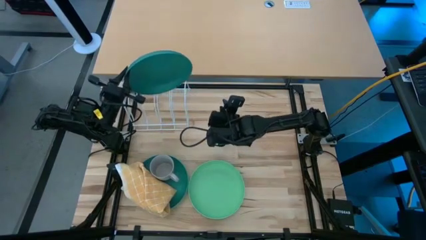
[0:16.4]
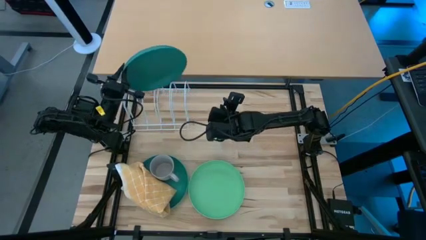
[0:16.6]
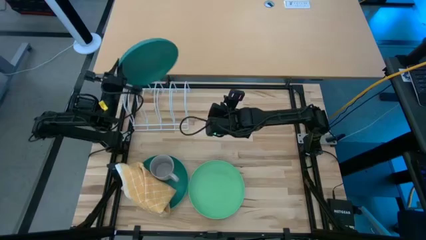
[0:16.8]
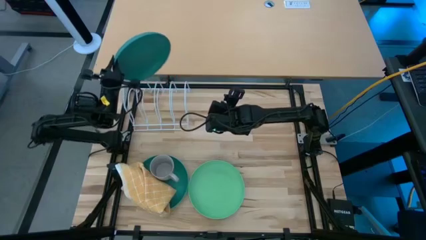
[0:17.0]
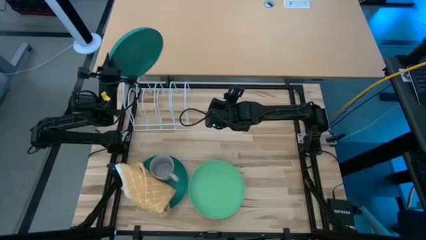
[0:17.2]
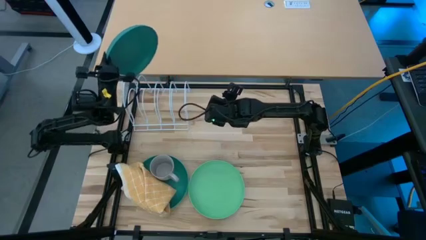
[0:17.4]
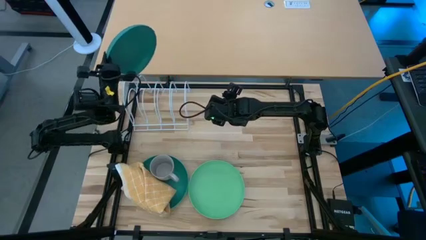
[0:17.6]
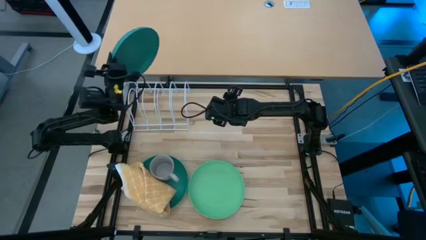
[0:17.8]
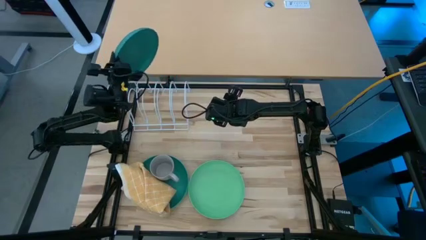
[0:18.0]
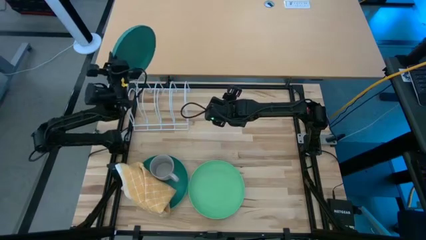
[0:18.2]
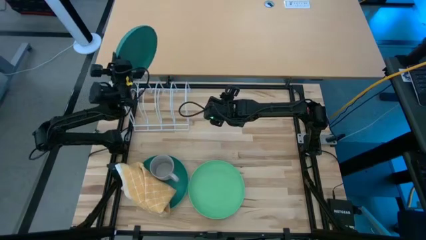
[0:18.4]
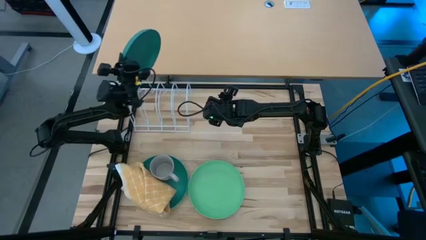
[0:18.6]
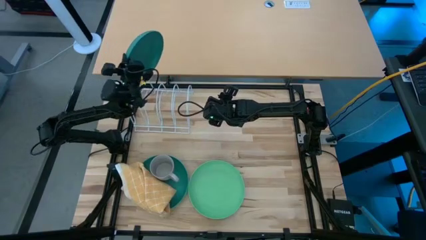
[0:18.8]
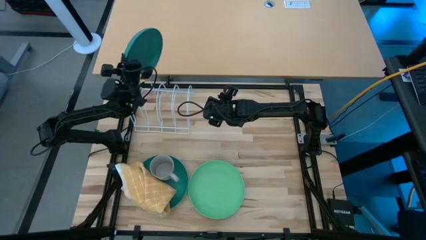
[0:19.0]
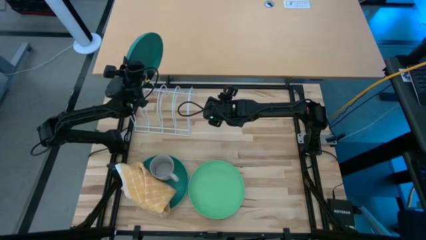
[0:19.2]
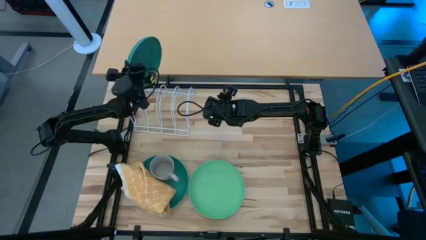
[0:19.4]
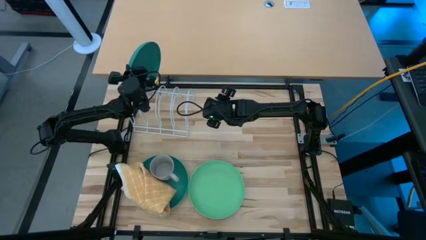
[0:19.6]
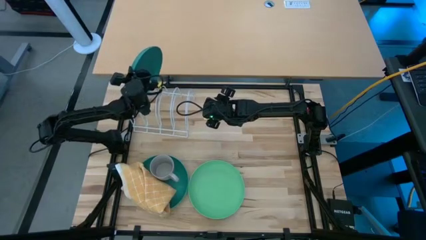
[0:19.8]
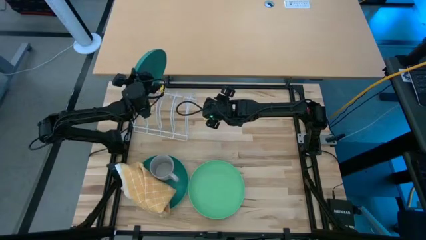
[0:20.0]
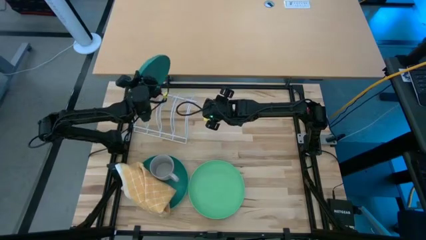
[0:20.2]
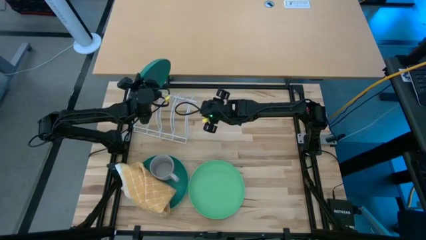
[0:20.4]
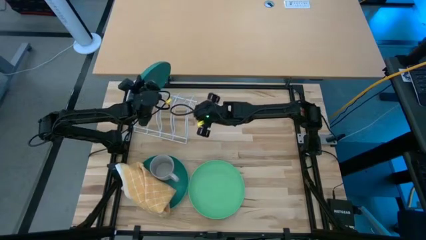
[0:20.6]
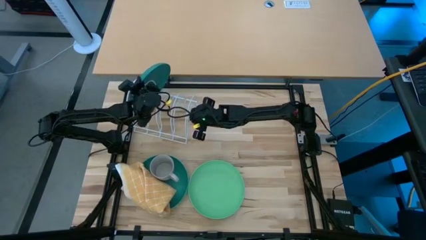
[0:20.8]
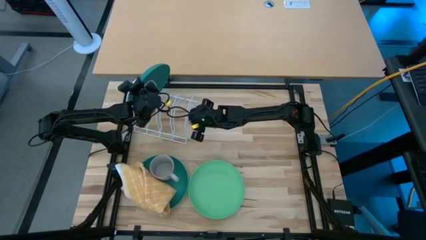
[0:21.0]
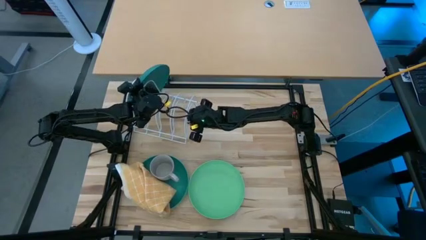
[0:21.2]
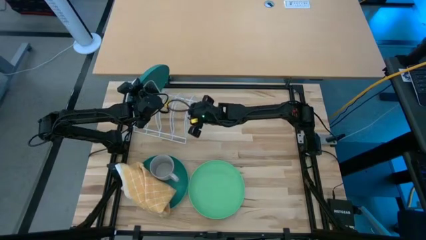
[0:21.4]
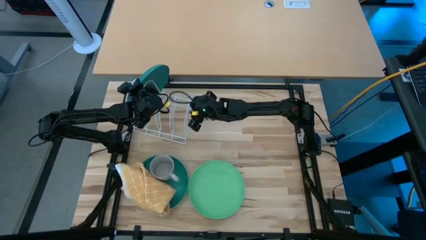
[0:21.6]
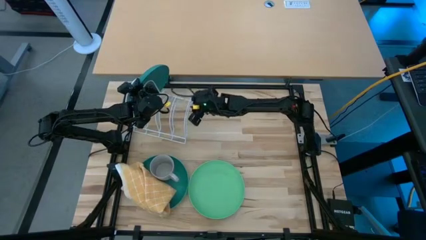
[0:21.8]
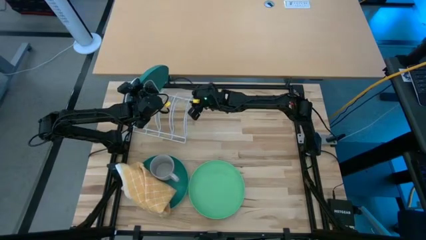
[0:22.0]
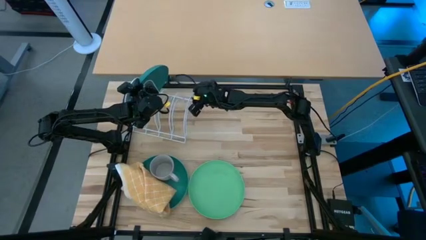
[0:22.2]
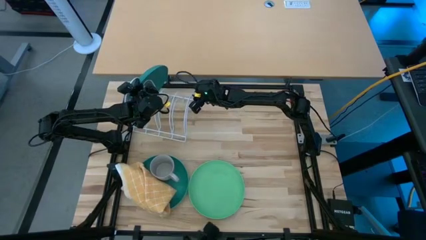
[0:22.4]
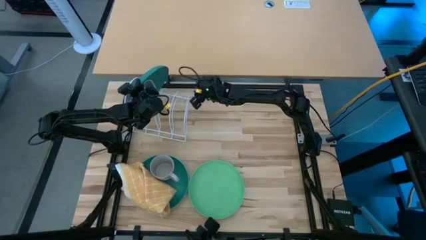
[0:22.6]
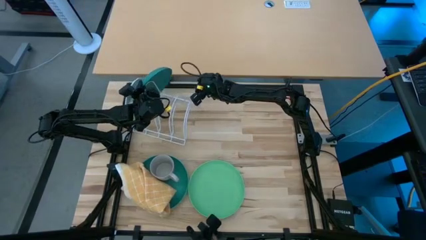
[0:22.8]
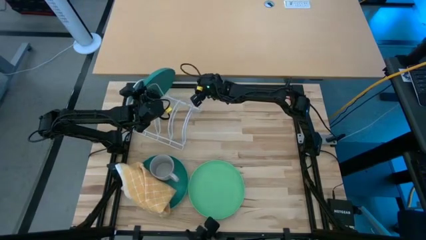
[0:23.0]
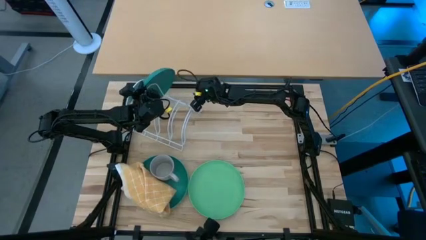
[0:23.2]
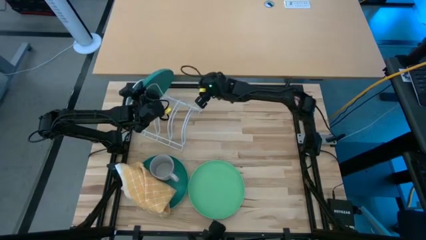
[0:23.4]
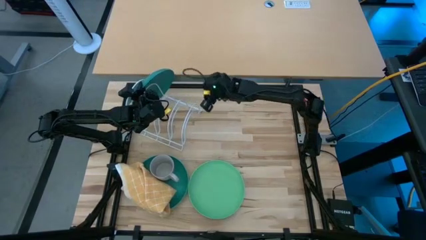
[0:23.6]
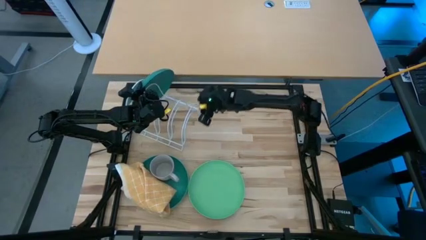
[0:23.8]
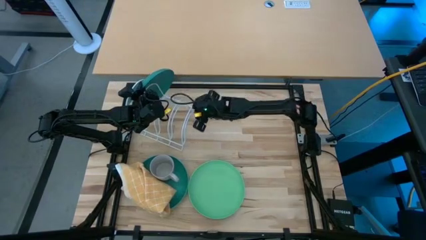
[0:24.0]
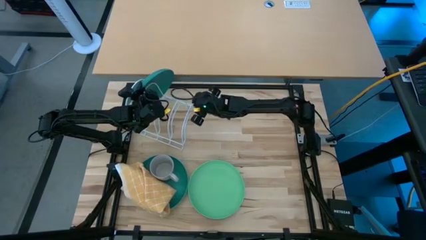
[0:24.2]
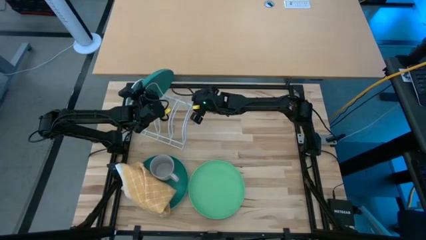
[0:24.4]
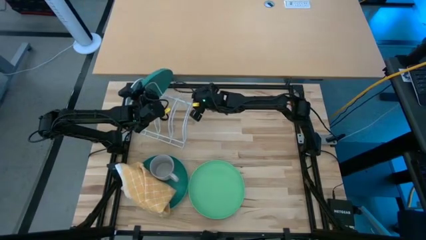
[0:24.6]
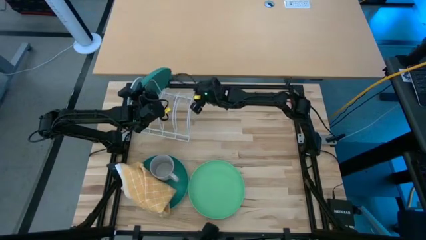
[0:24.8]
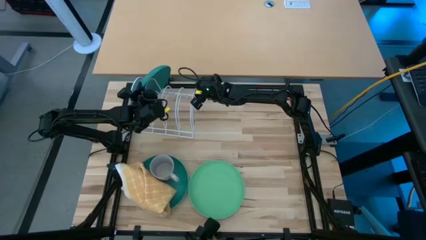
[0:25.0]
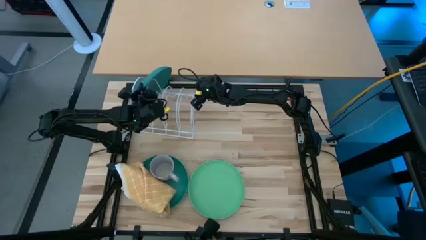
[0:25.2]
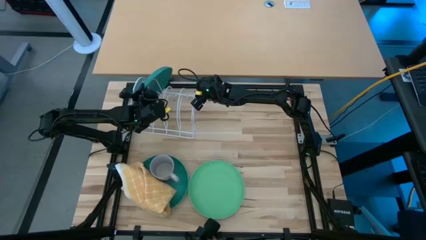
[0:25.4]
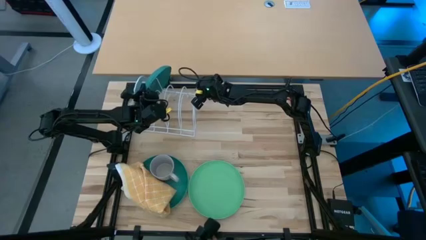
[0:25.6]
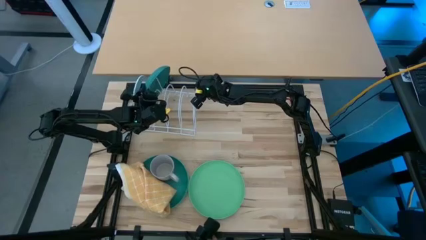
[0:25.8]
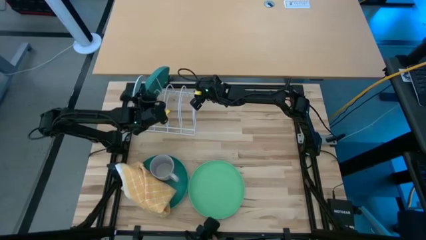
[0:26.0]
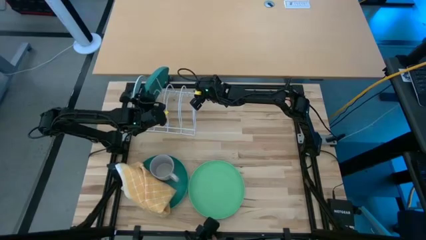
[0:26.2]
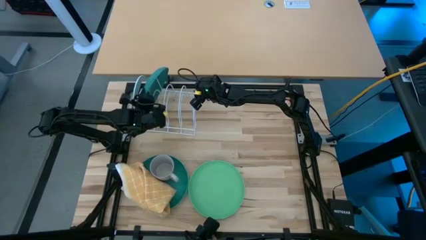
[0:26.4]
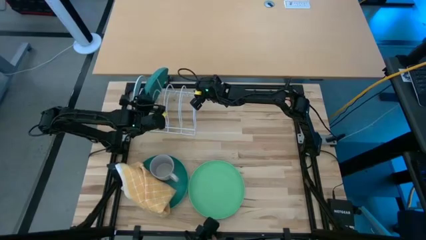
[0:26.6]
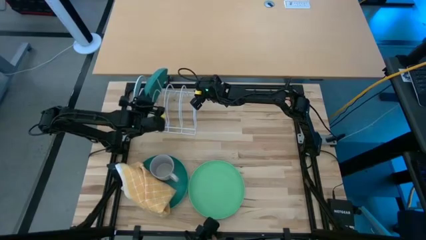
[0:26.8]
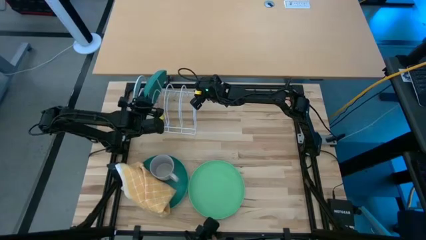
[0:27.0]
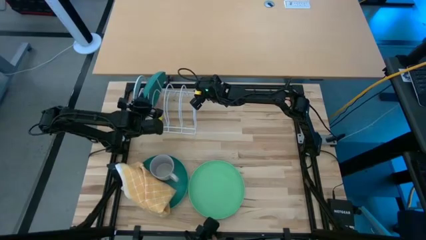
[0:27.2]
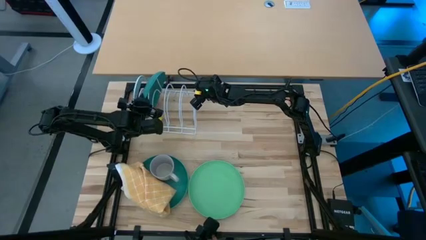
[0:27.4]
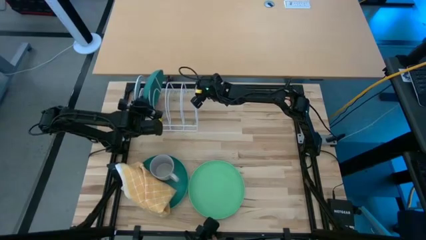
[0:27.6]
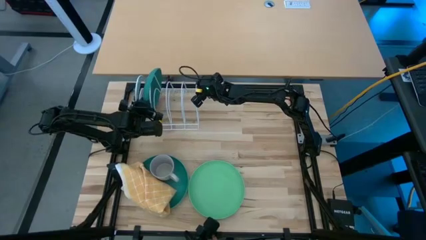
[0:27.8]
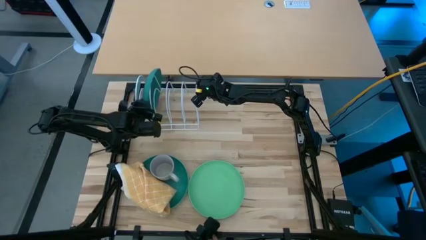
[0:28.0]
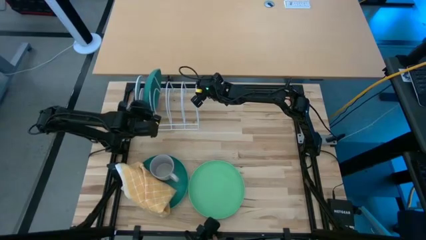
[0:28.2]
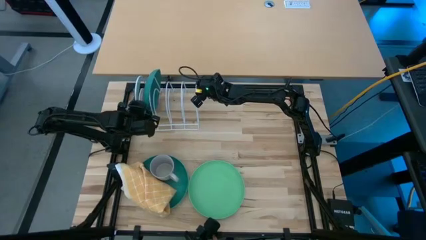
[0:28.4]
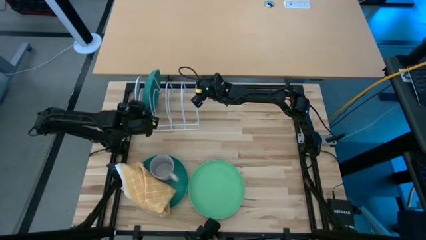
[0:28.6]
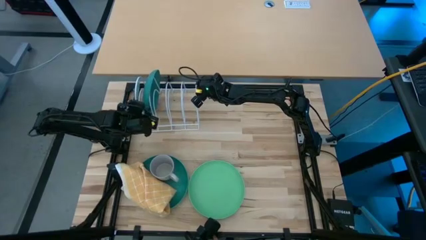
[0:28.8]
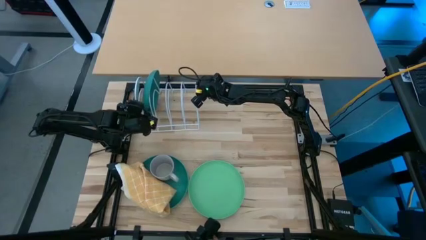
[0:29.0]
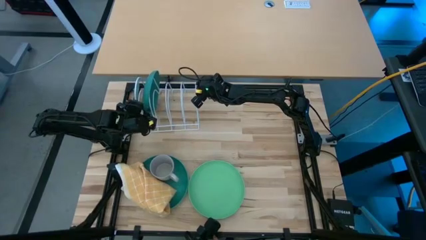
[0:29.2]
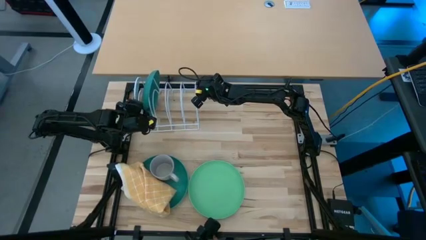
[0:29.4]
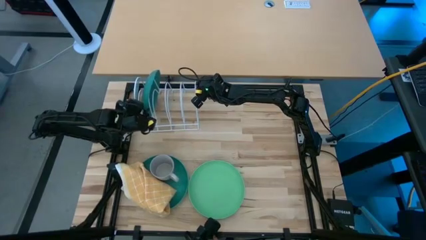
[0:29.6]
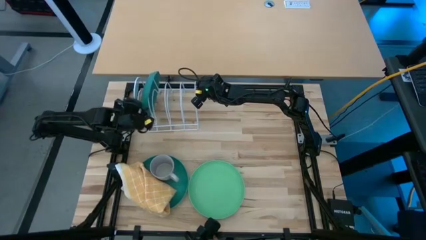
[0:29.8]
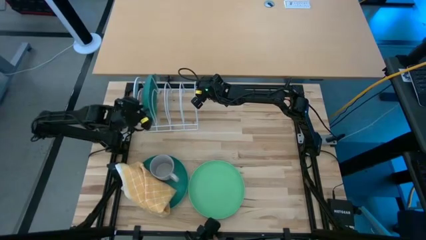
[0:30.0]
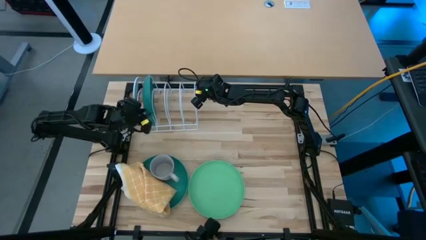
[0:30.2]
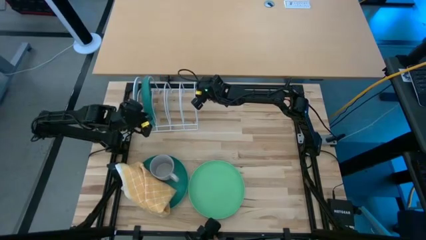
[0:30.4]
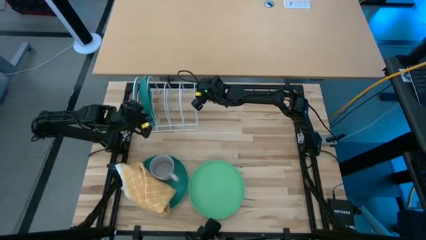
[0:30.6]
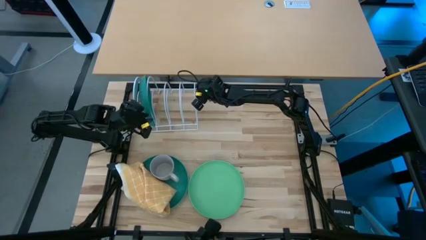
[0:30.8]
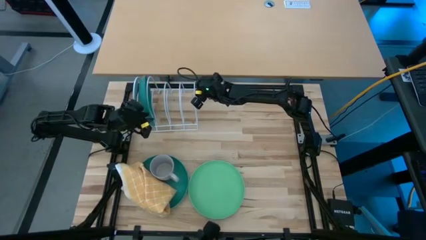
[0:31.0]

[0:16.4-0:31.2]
Task: Sort dishes
Put the right dark green plate into the dish rack
